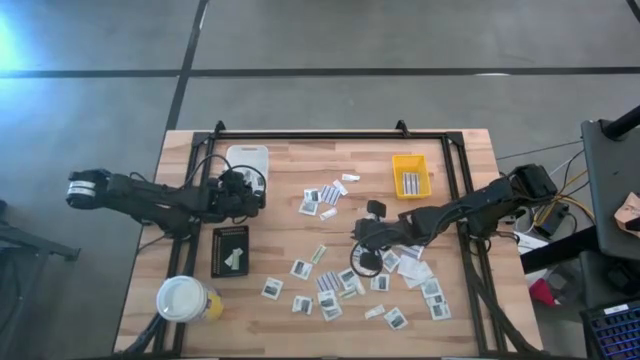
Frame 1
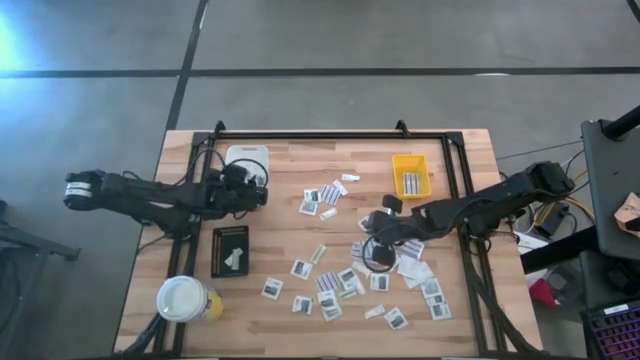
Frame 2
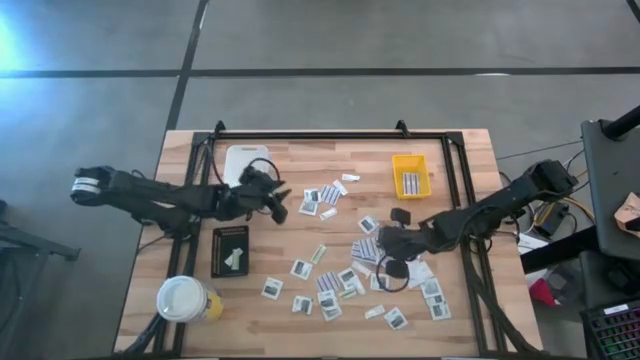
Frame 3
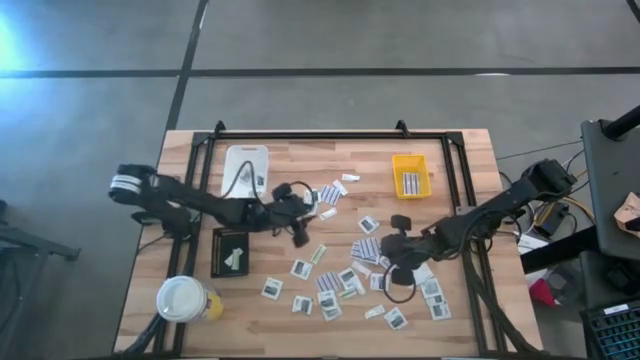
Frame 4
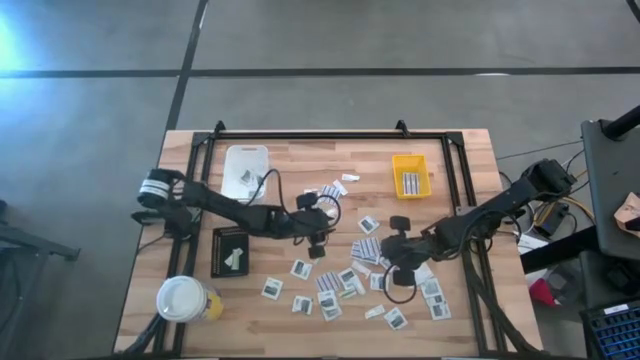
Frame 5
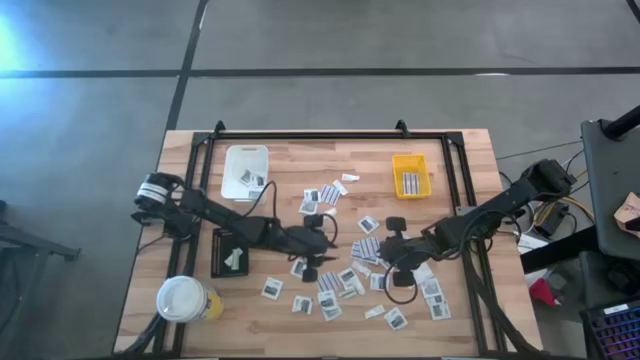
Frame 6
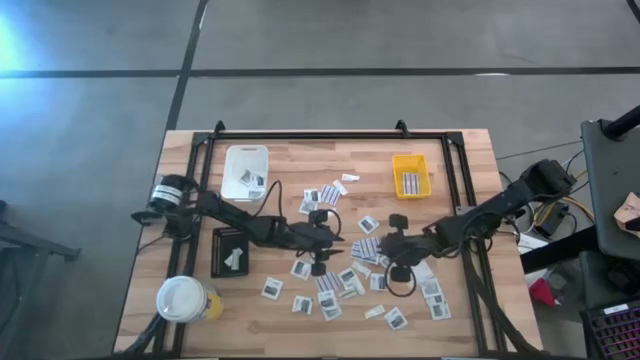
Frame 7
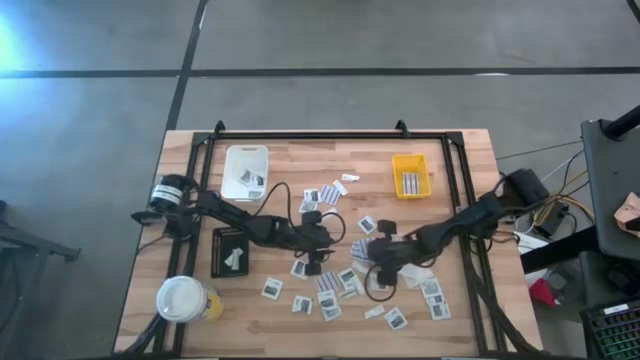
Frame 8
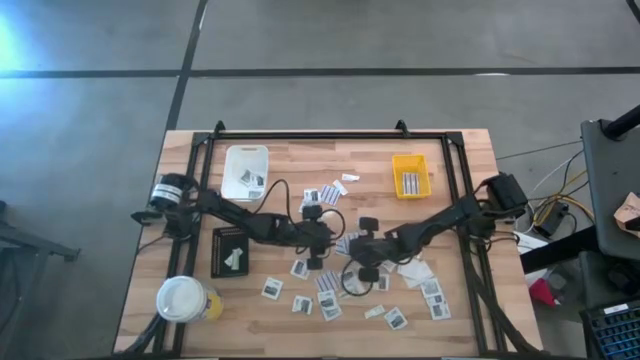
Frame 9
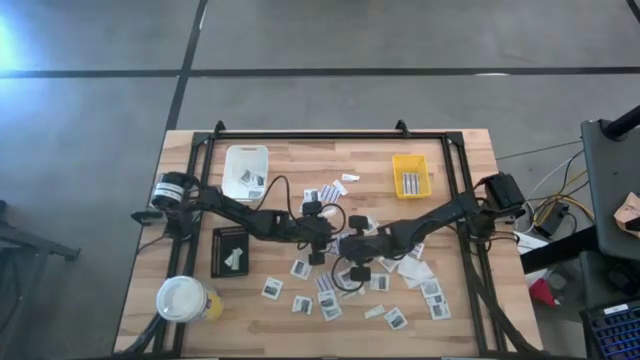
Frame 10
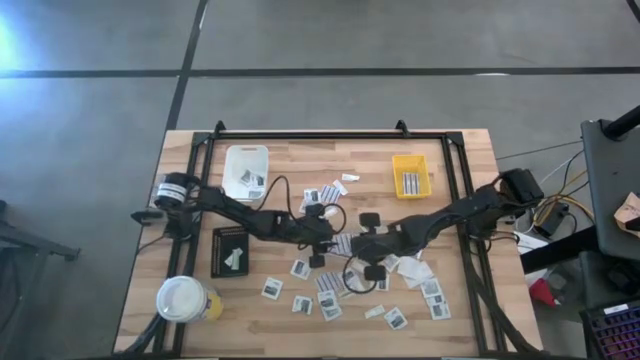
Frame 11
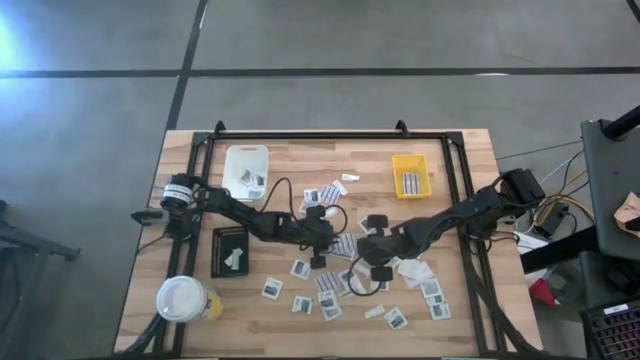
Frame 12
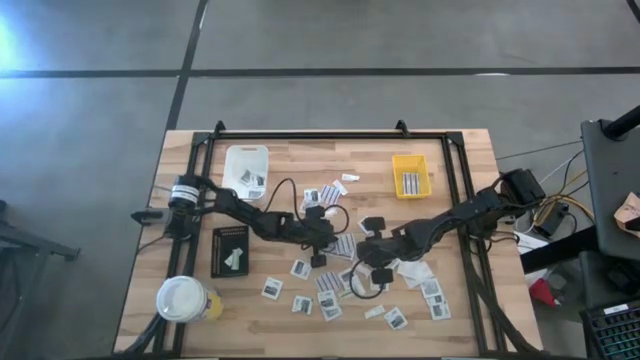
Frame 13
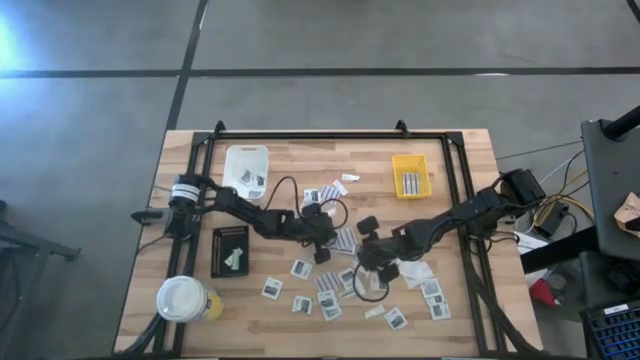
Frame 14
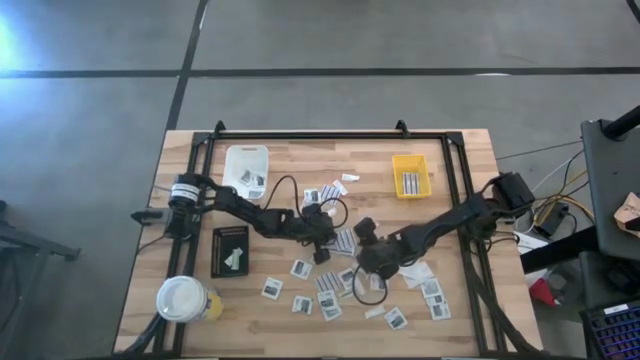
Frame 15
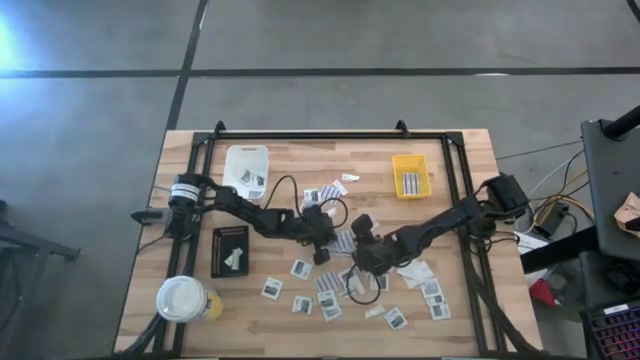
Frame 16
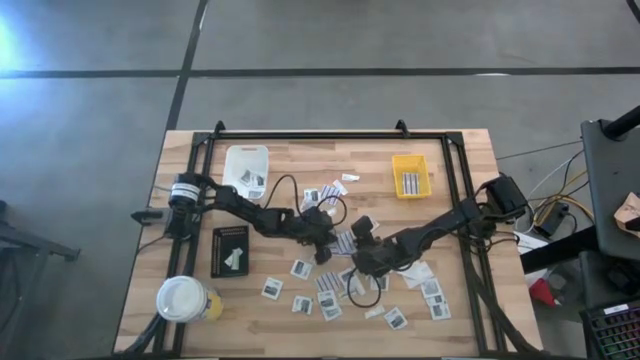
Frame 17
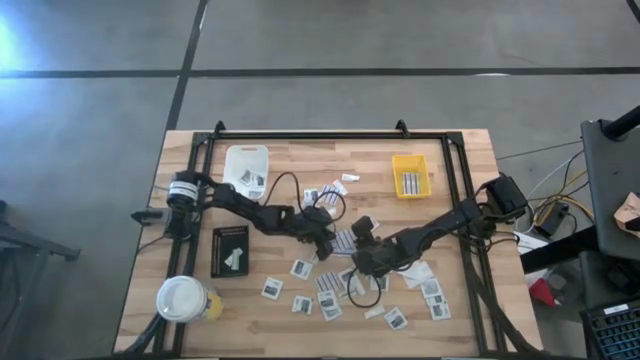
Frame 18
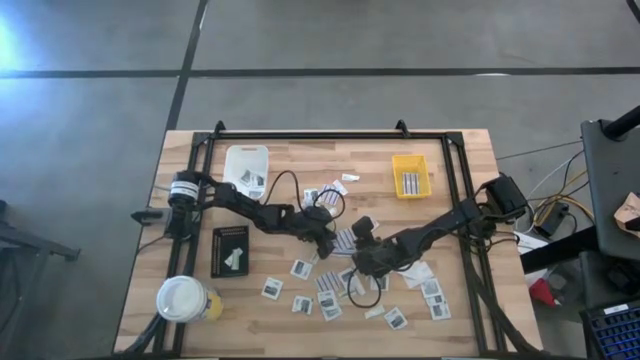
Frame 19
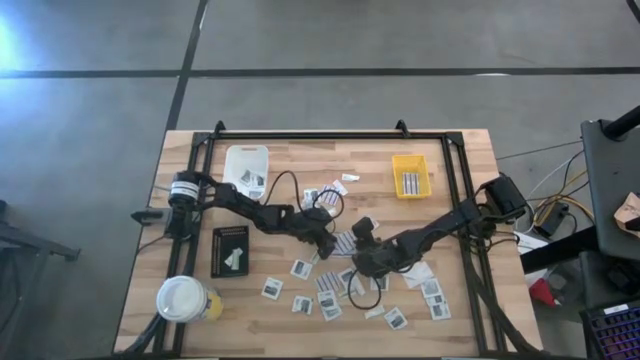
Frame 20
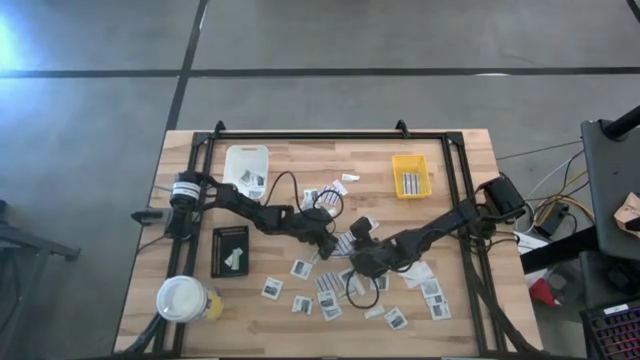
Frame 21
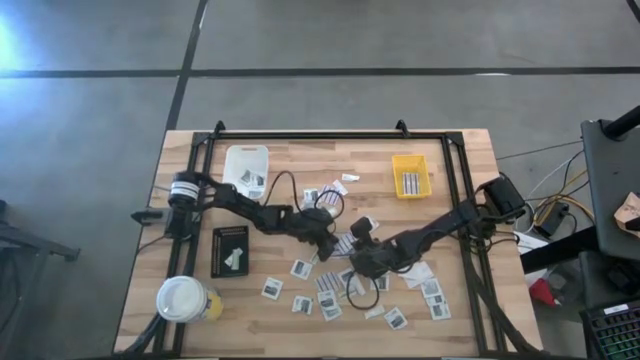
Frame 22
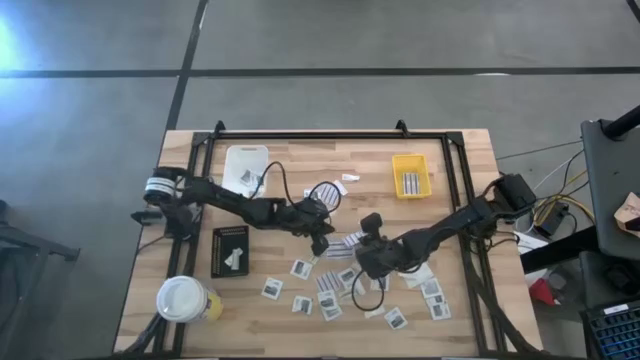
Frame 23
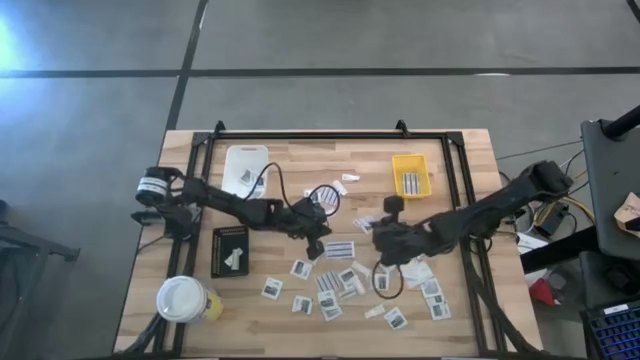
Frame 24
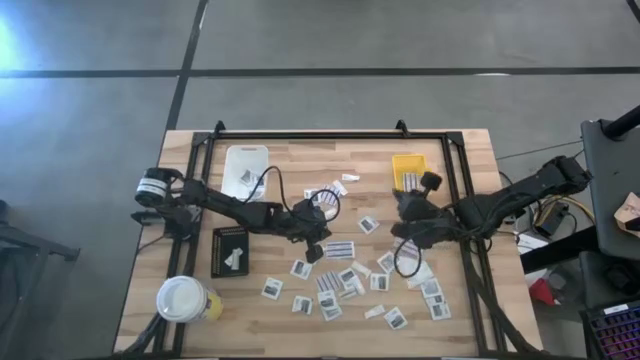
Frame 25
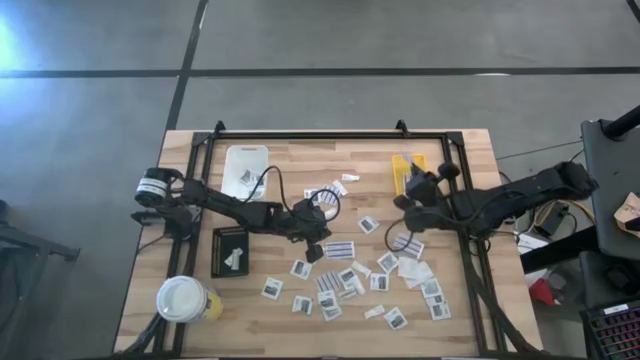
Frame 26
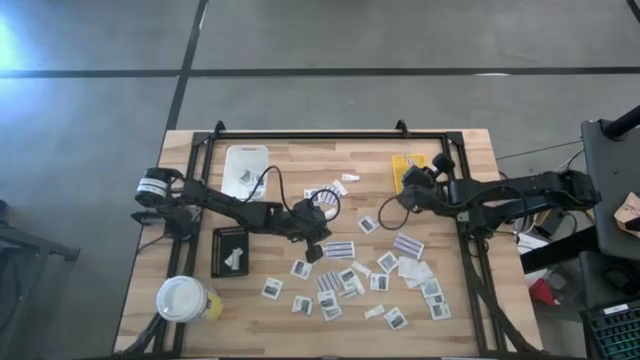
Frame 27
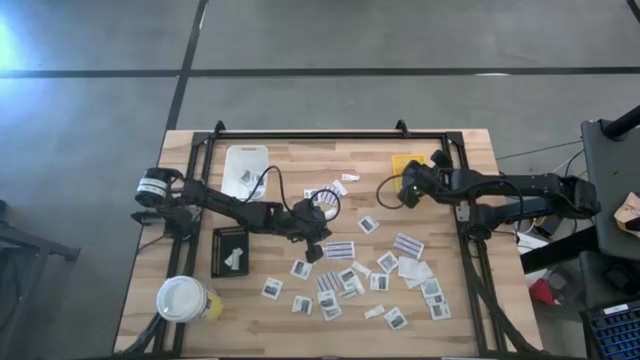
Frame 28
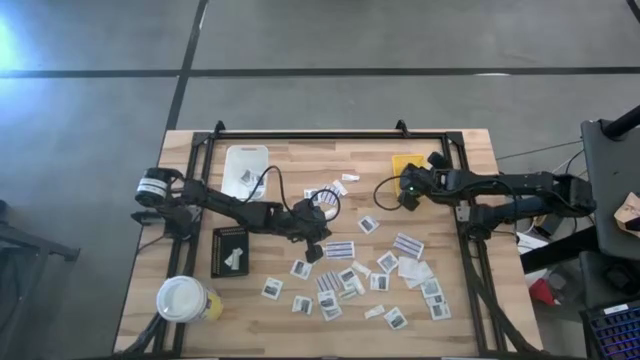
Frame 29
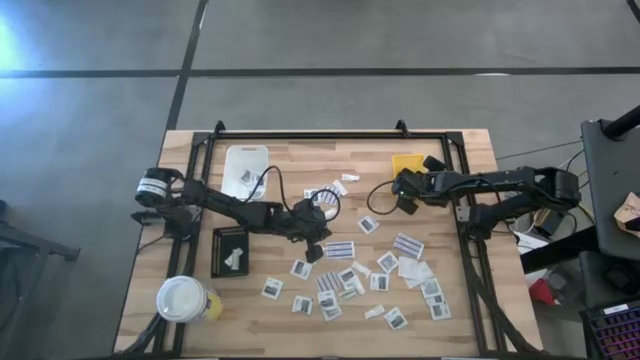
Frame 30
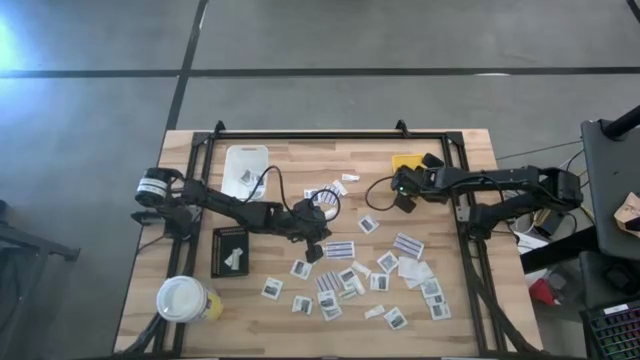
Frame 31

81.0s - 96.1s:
Task: Pick & Place First Aid Supplies
Put the blue bandage pack into the yellow bin

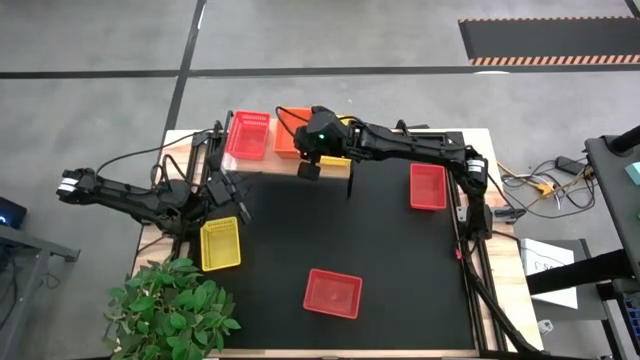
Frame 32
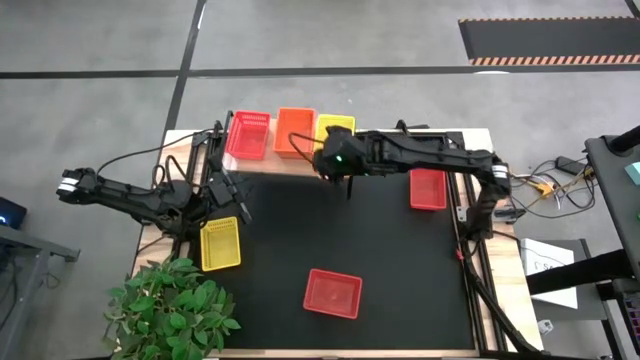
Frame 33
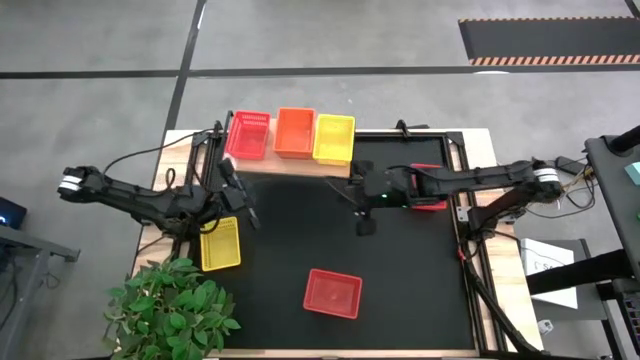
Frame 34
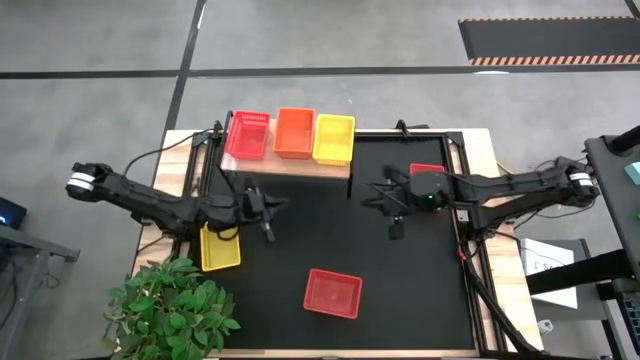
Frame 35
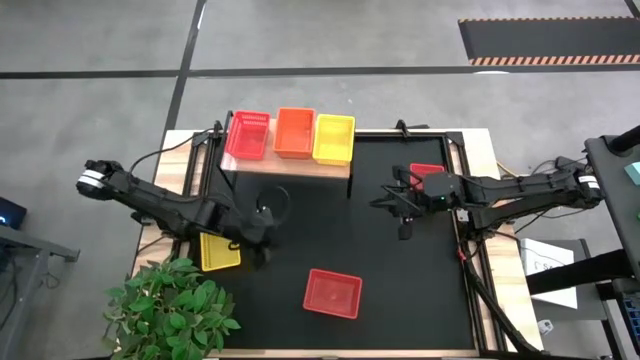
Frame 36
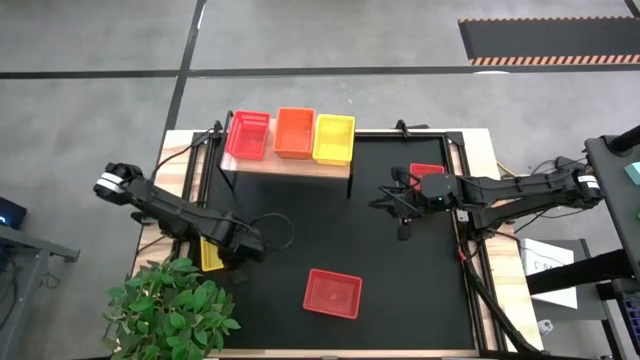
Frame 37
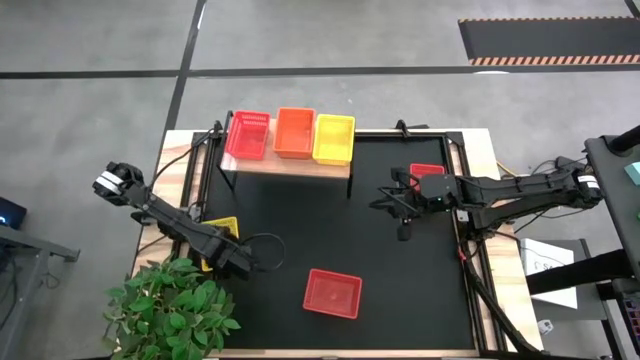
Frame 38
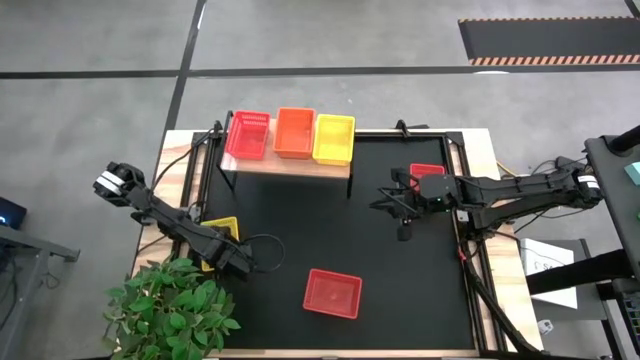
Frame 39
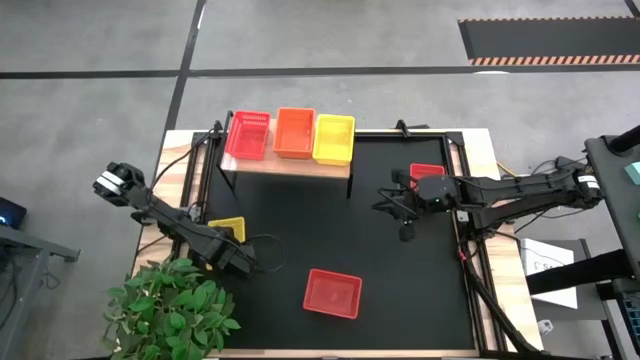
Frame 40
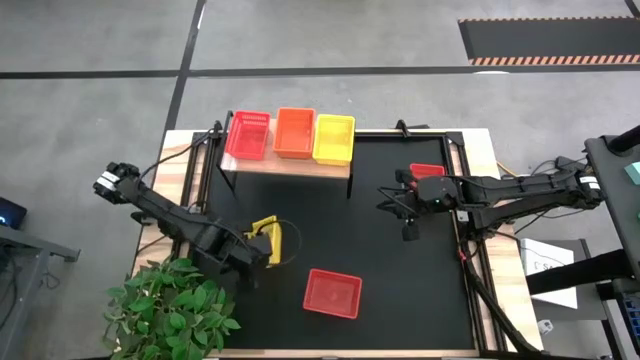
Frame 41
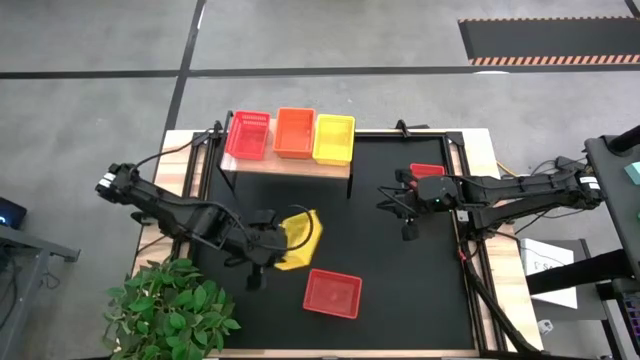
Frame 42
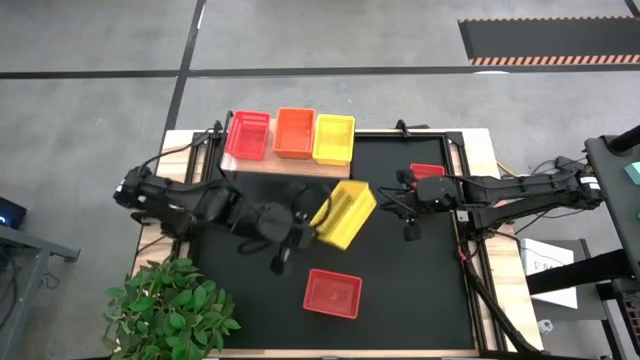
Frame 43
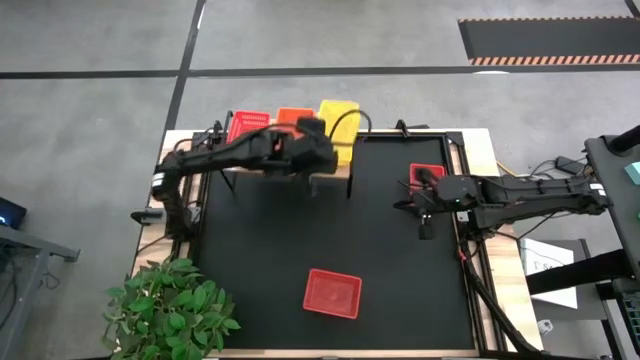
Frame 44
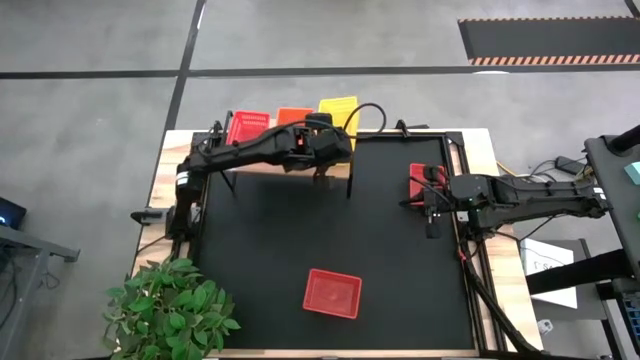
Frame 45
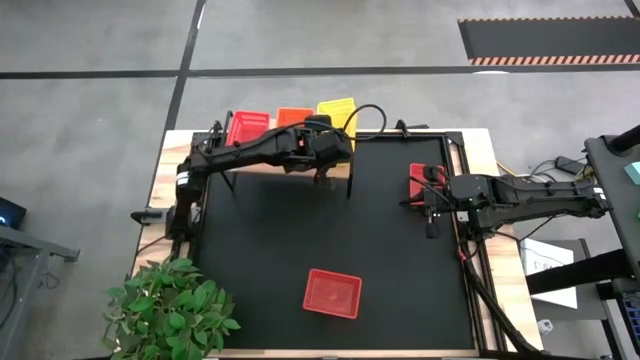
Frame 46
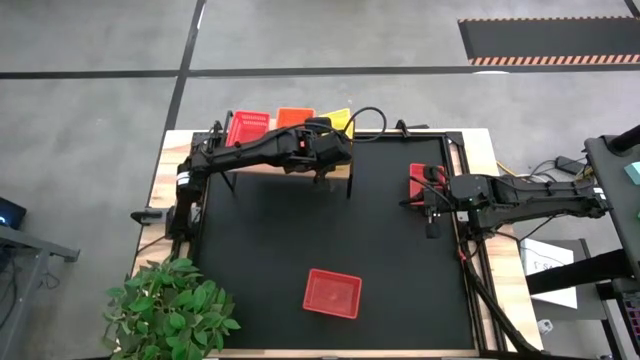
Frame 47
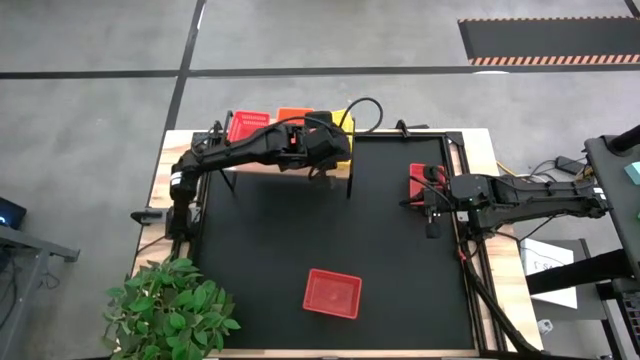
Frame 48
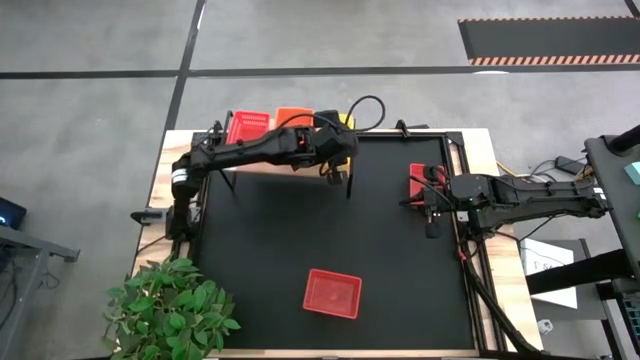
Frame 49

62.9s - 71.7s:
Task: Stack baskets on shelf by color
Stack the yellow bin on the other yellow bin on the shelf
